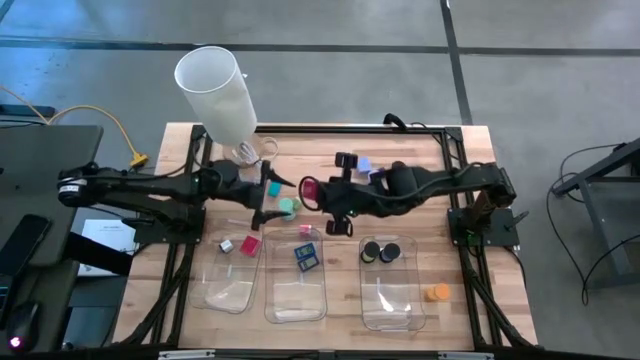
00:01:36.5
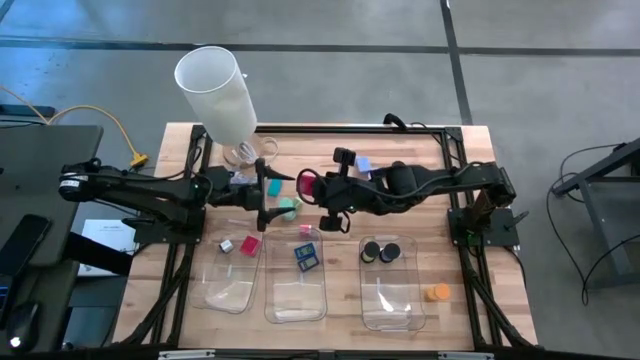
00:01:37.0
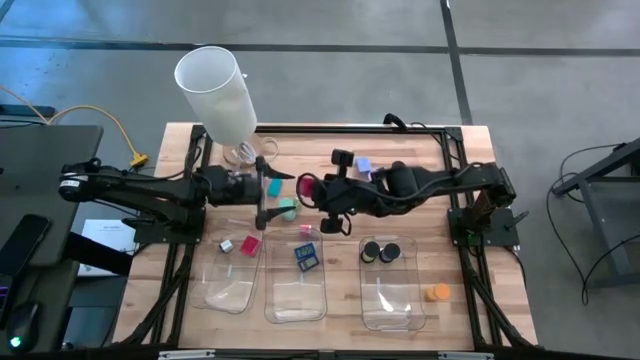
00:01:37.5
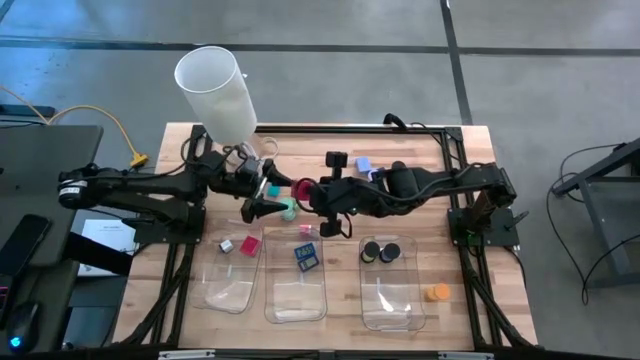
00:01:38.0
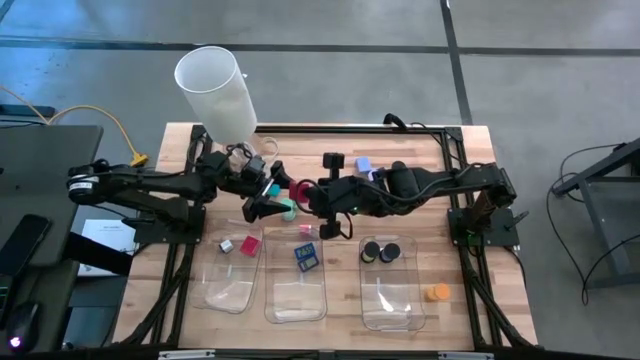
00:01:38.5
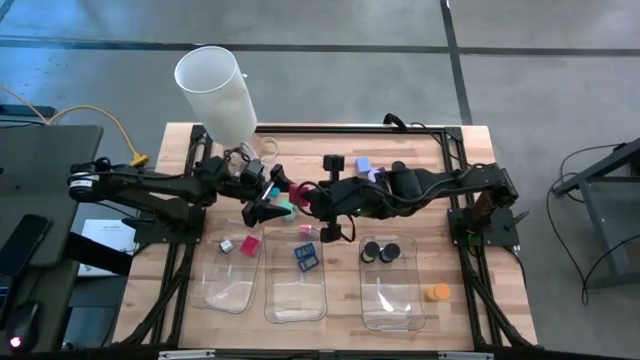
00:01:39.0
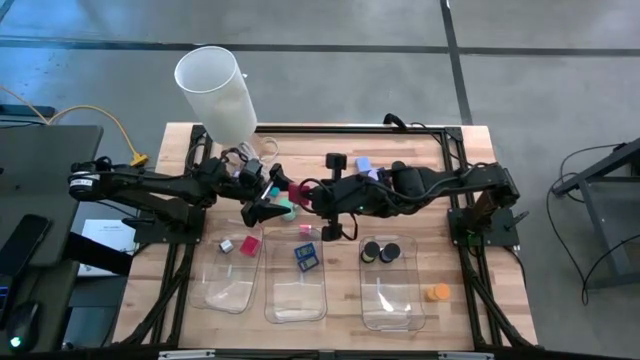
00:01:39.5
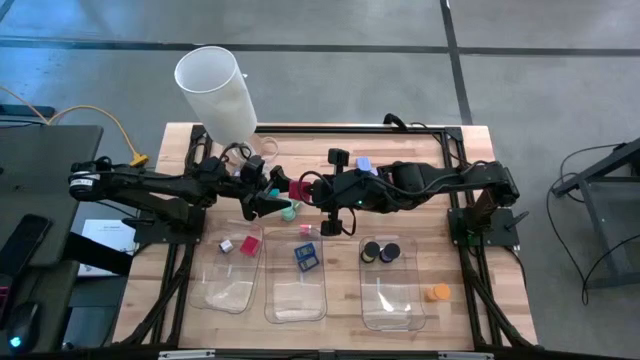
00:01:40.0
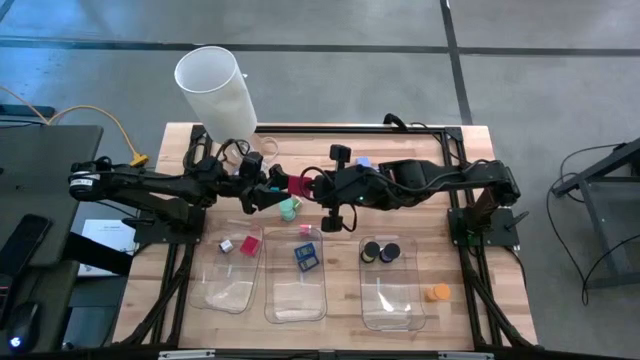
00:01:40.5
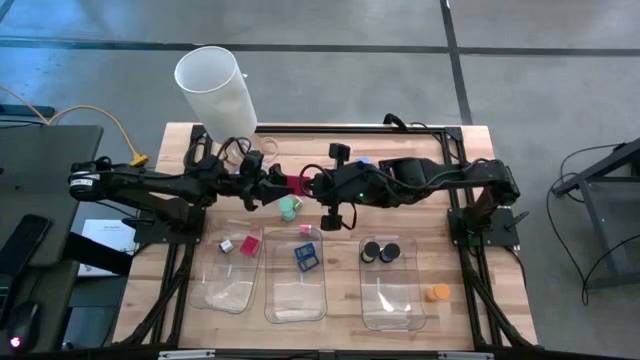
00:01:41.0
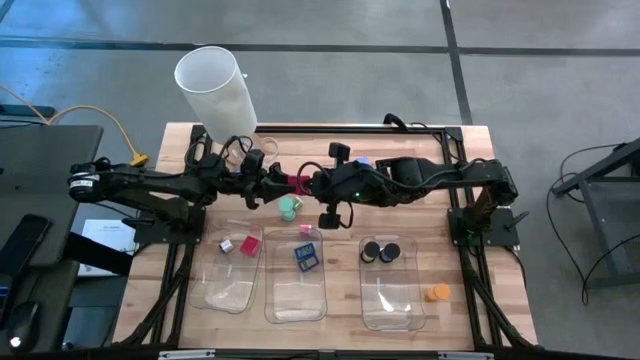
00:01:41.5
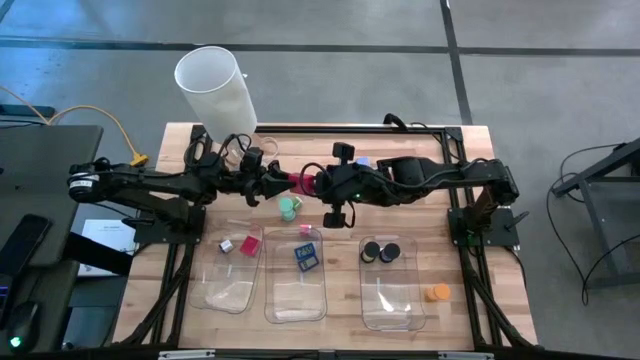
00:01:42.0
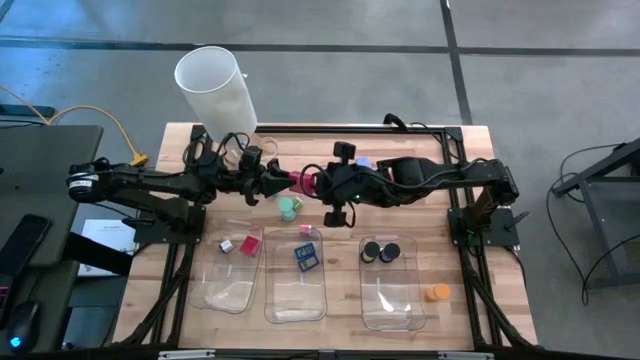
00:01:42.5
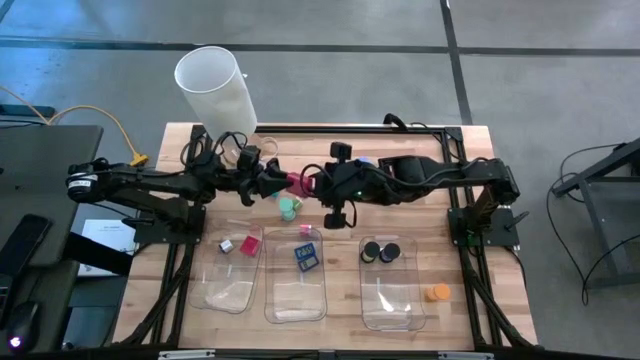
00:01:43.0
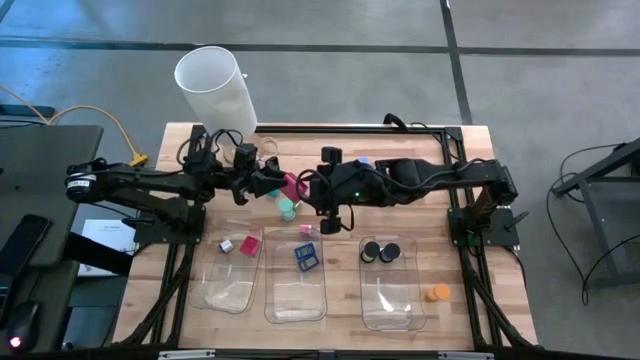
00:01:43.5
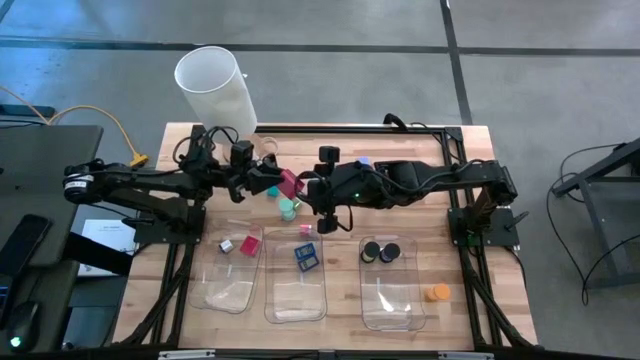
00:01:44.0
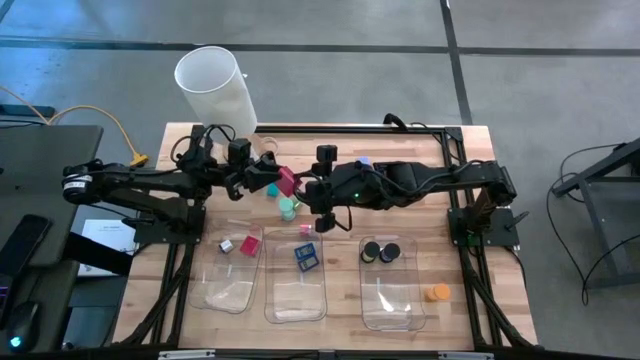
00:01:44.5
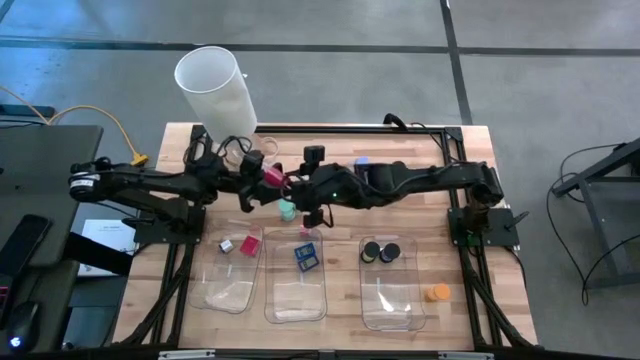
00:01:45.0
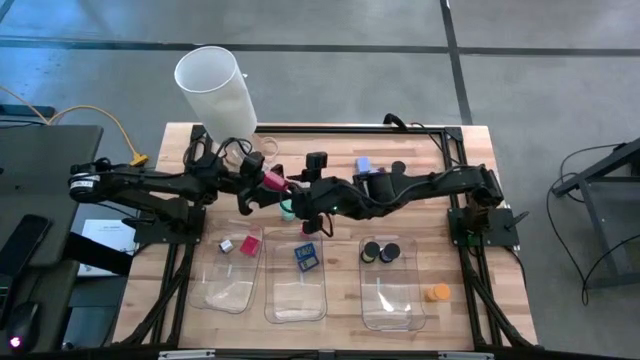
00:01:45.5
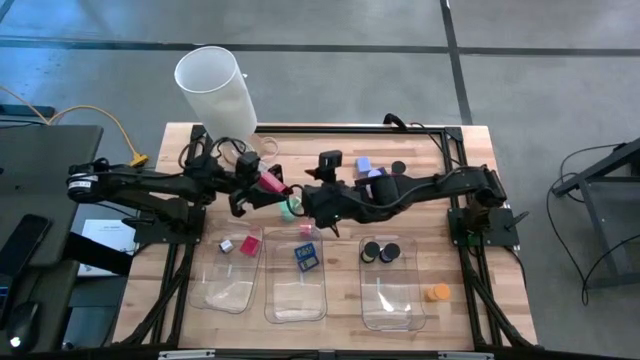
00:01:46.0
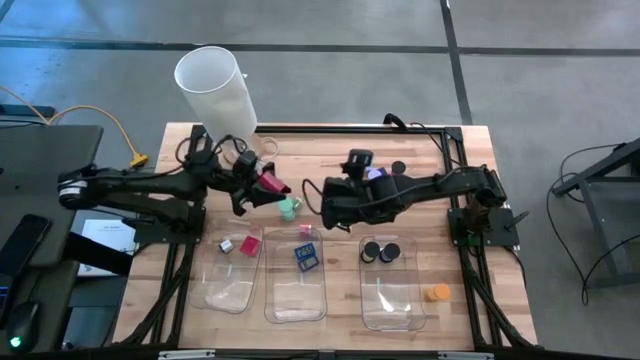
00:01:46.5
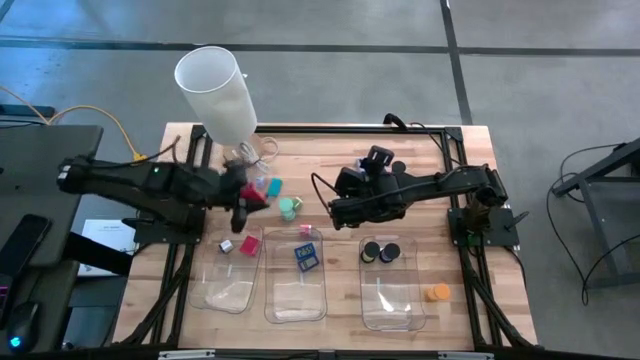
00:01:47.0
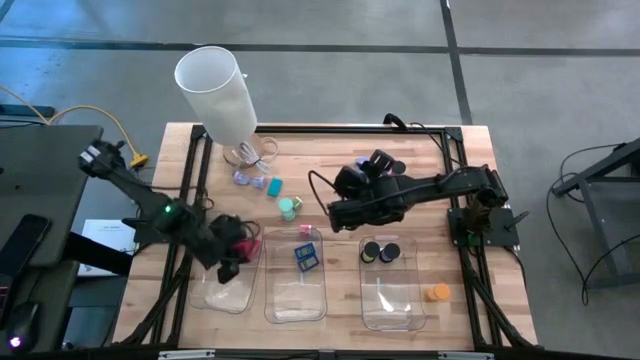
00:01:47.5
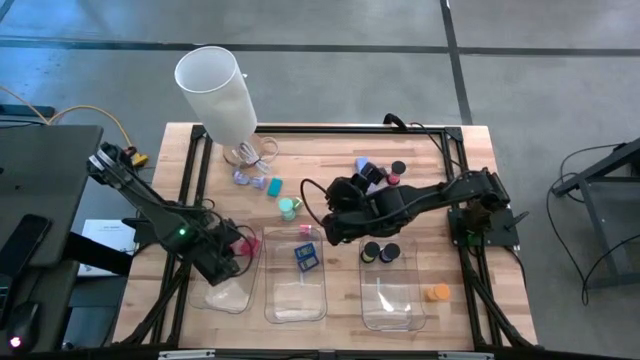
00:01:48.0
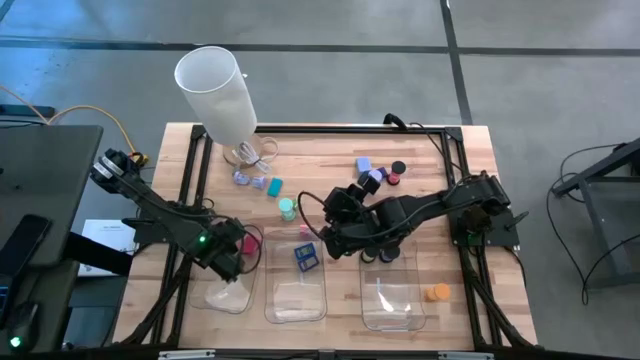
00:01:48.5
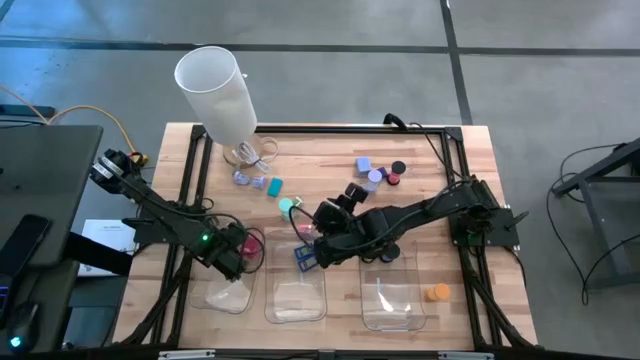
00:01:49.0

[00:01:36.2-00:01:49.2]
Task: Pick & Place Office items
Put the top middle red adapter into the left bin

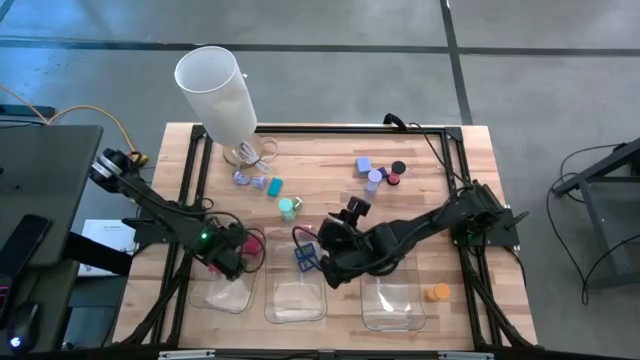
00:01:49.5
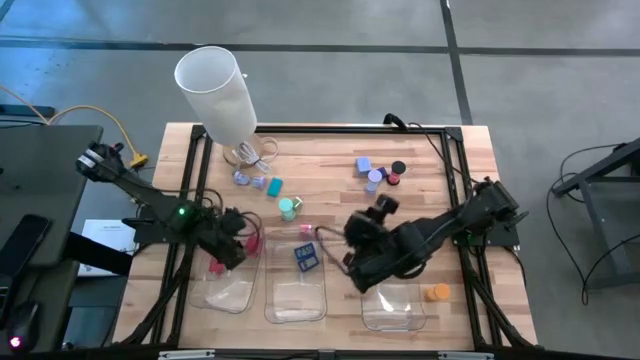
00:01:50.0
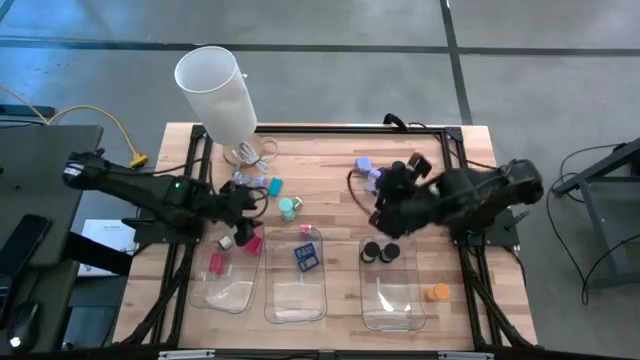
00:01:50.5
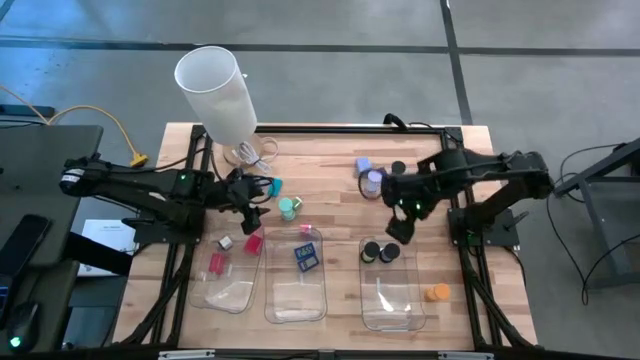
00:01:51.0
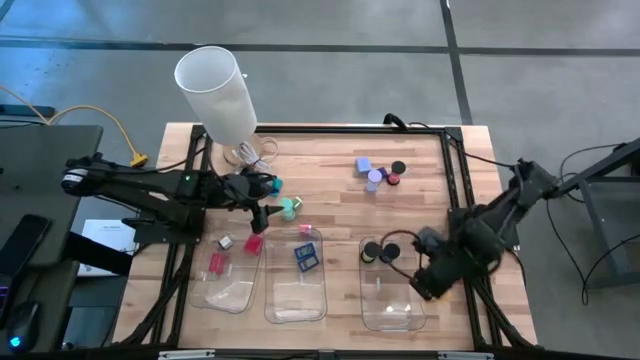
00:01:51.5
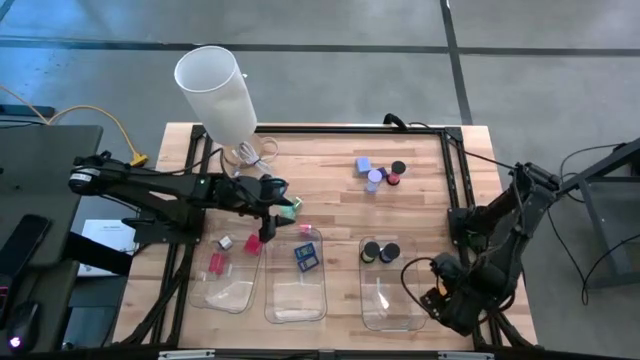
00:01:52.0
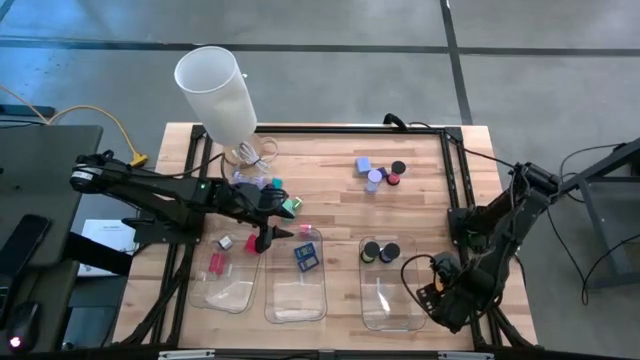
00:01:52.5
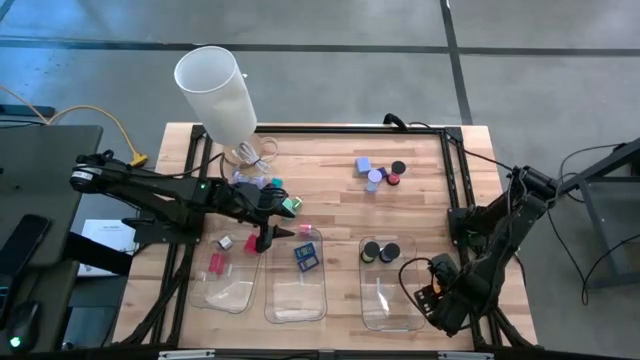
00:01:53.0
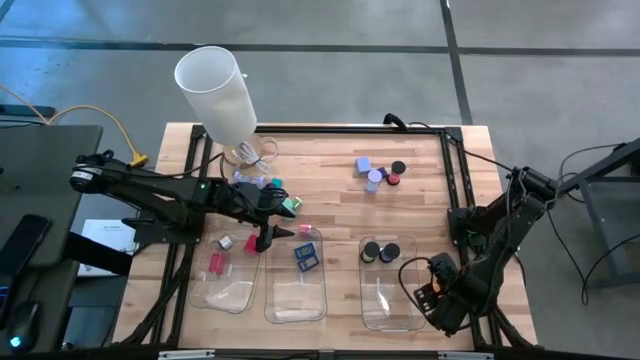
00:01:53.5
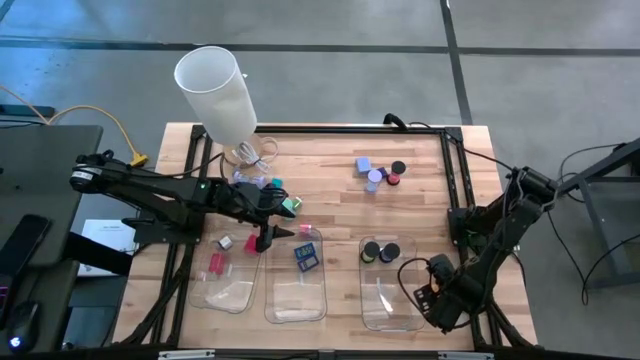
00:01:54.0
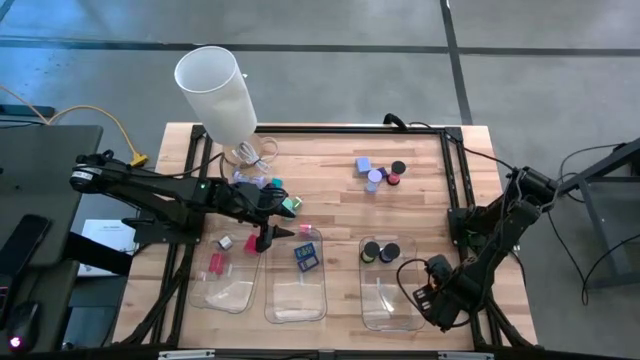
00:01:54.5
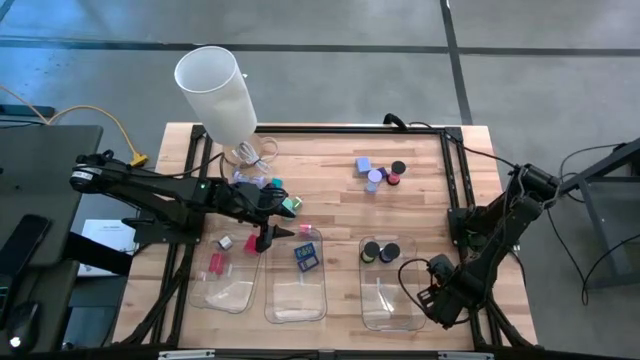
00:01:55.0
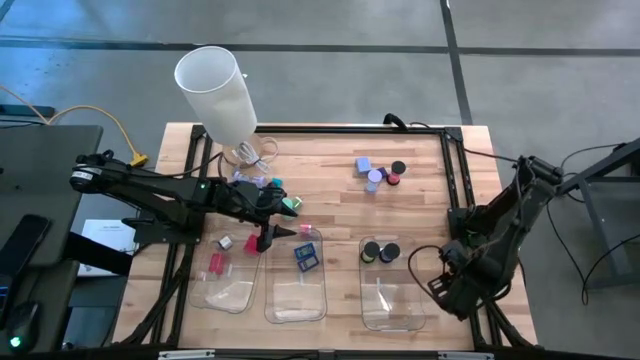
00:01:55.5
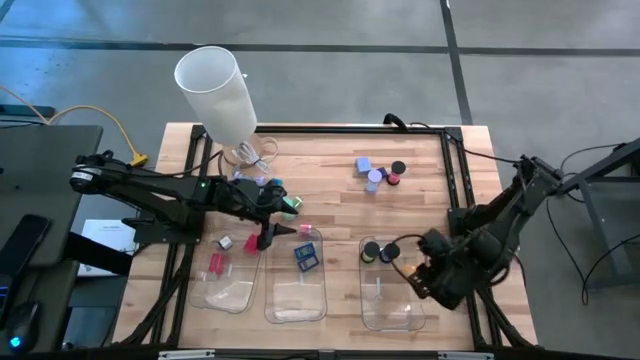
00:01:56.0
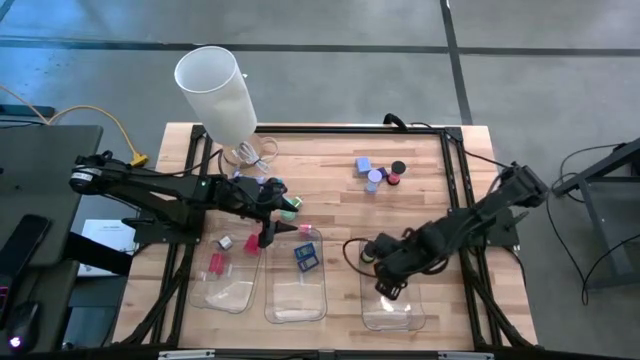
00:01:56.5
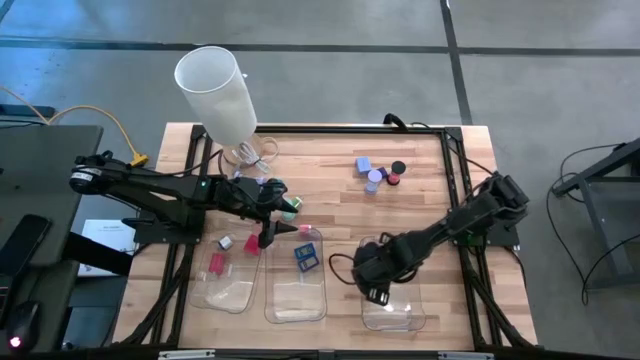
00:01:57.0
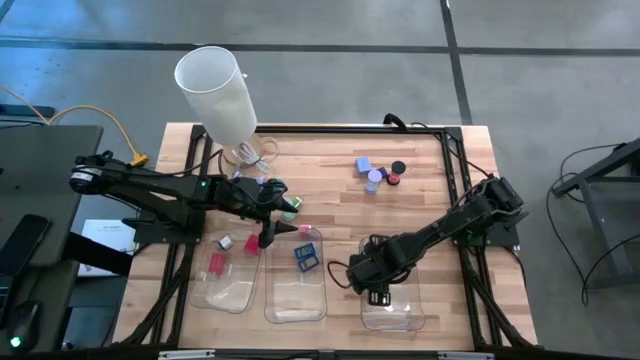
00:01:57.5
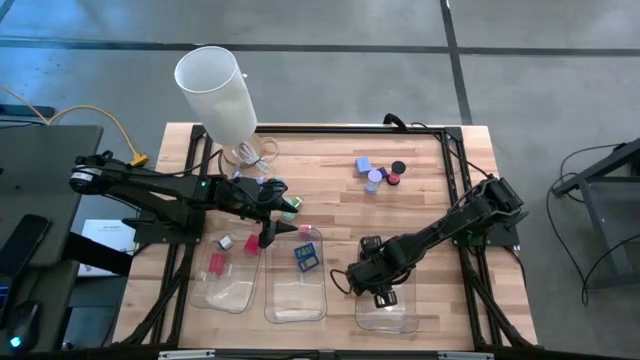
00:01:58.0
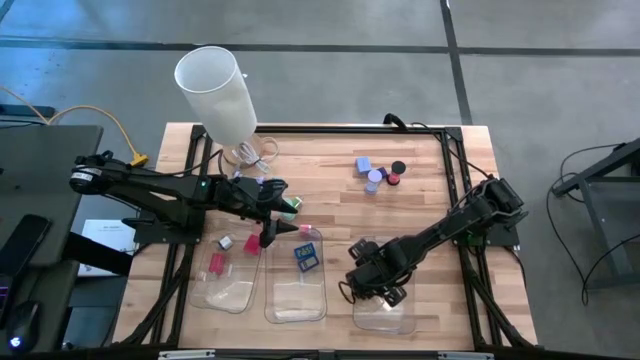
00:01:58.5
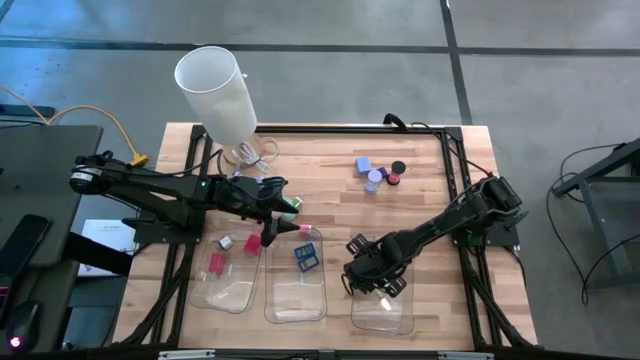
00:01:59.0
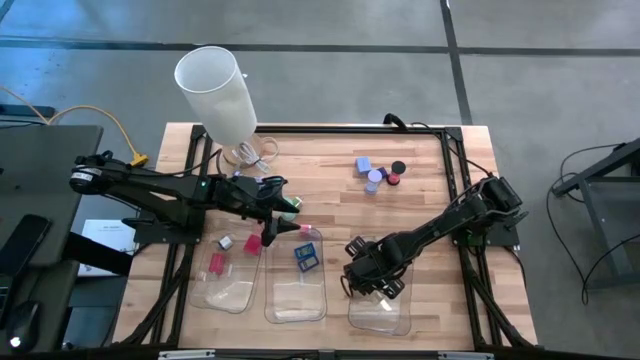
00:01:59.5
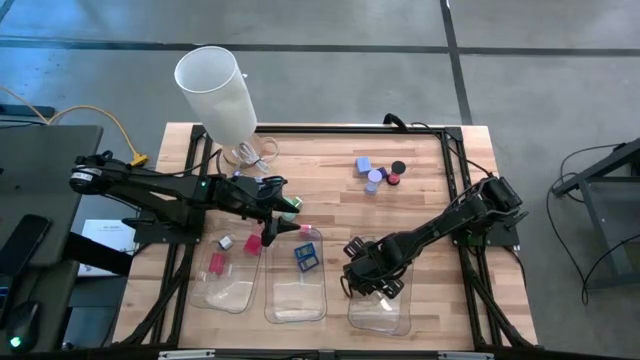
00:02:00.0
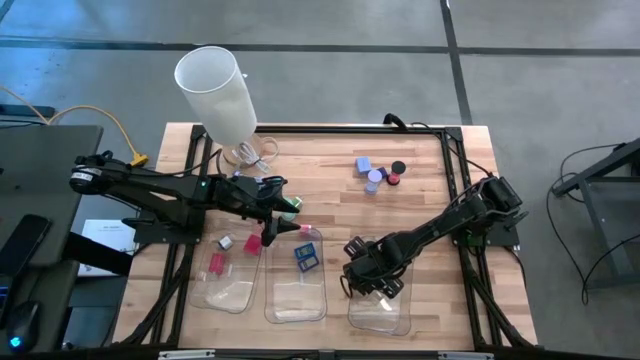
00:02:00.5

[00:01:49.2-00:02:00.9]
Put the yellow hourglass into the right bin
